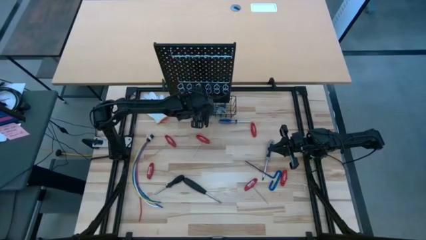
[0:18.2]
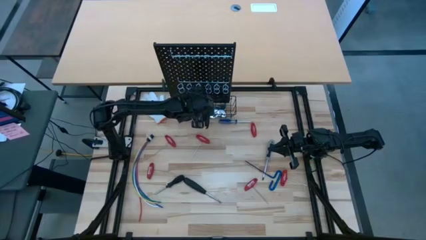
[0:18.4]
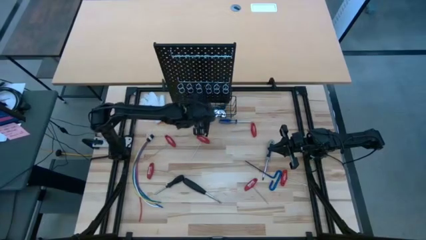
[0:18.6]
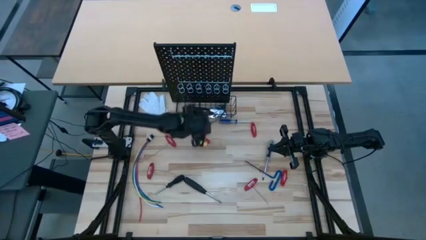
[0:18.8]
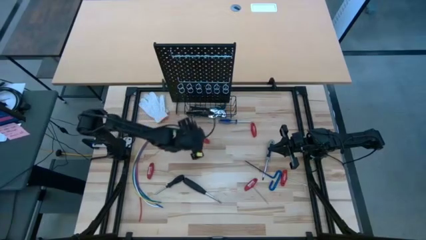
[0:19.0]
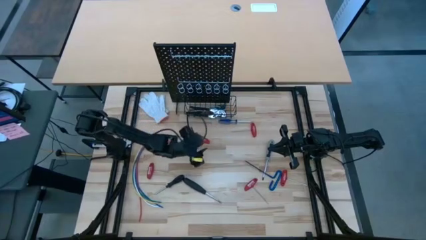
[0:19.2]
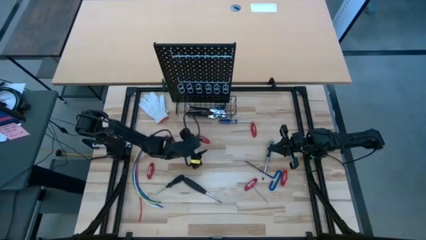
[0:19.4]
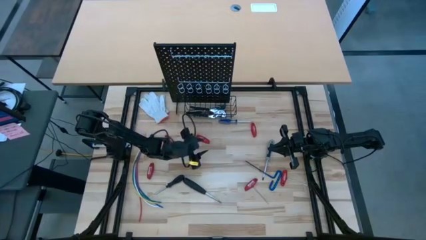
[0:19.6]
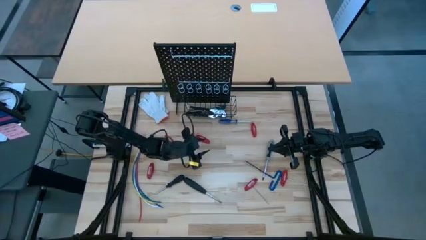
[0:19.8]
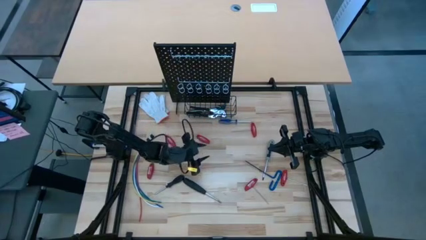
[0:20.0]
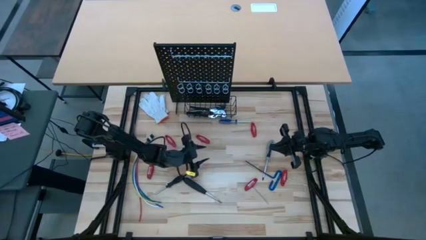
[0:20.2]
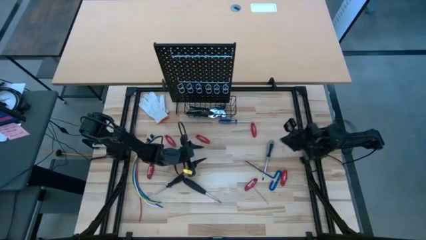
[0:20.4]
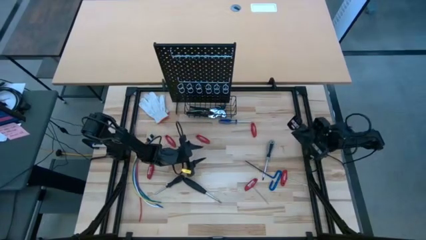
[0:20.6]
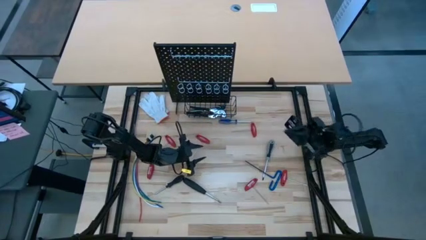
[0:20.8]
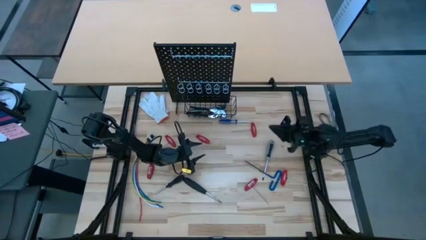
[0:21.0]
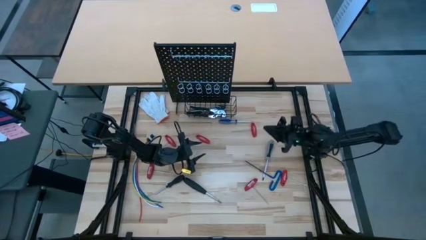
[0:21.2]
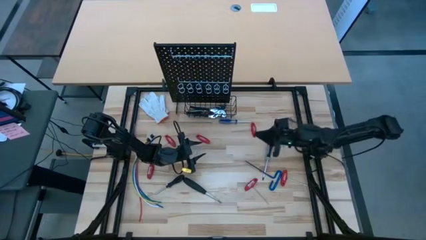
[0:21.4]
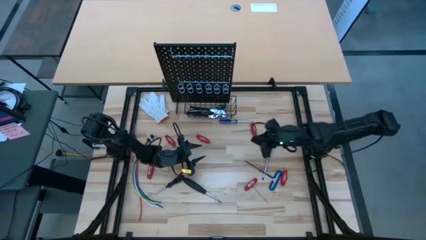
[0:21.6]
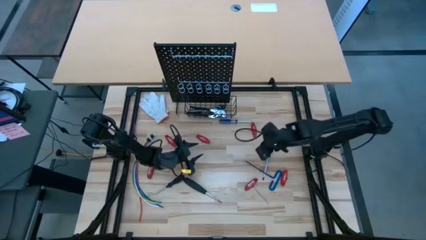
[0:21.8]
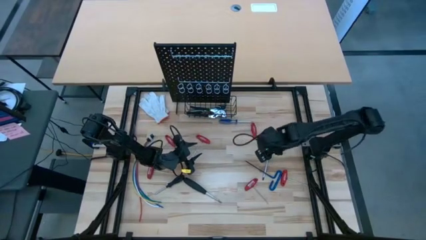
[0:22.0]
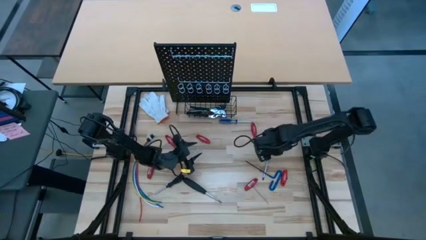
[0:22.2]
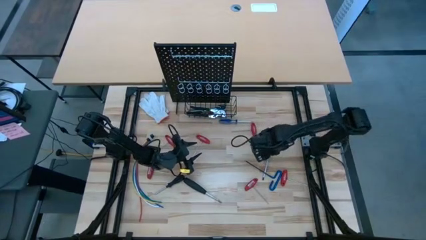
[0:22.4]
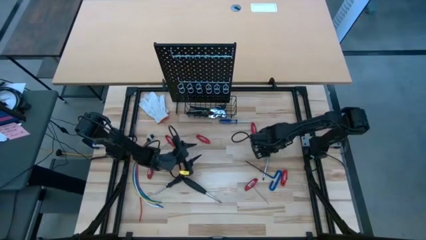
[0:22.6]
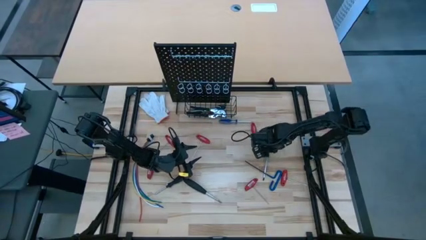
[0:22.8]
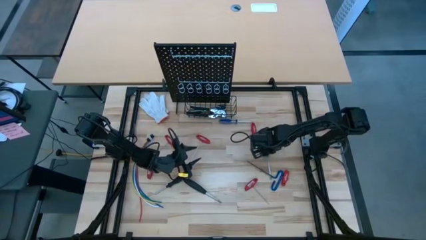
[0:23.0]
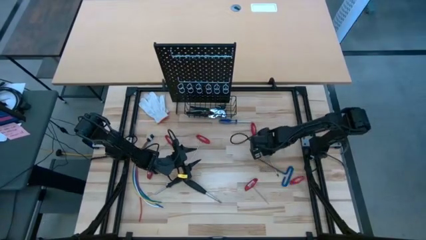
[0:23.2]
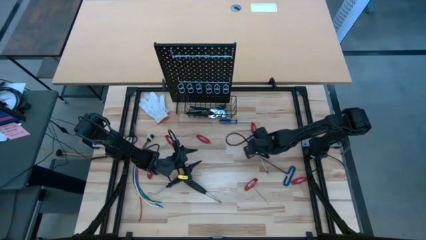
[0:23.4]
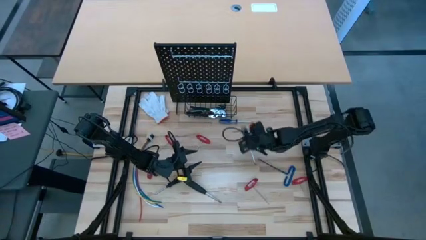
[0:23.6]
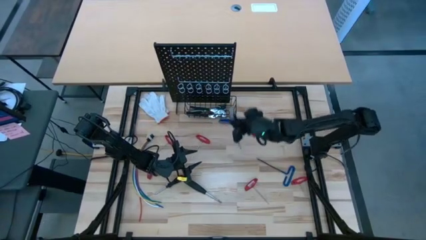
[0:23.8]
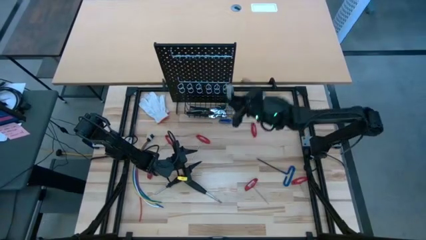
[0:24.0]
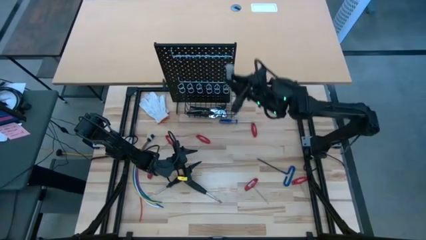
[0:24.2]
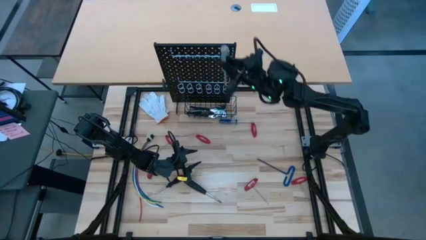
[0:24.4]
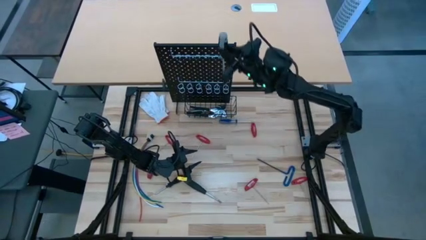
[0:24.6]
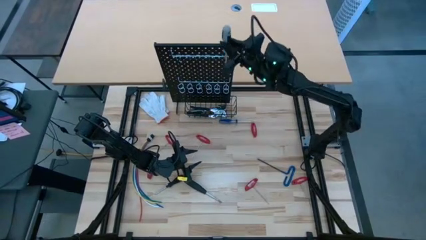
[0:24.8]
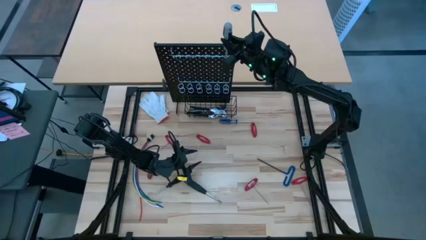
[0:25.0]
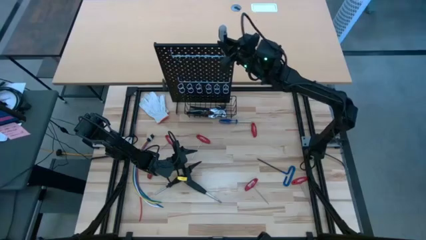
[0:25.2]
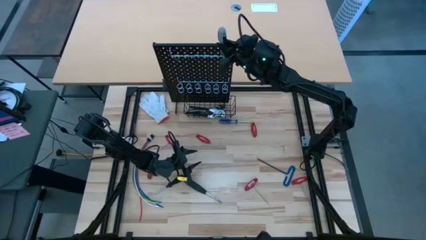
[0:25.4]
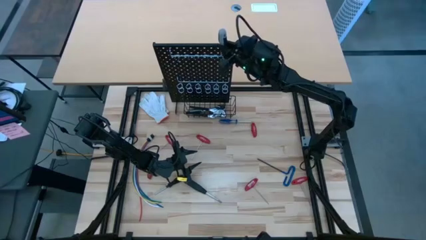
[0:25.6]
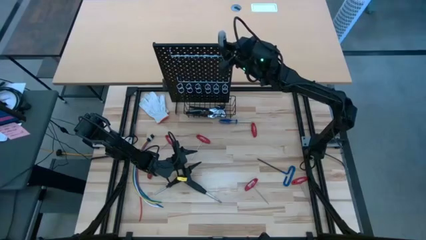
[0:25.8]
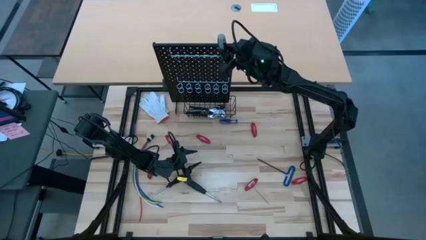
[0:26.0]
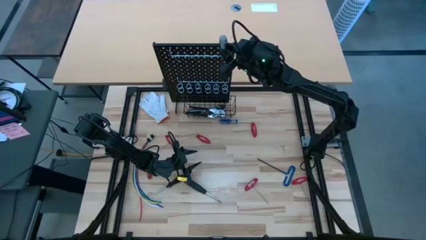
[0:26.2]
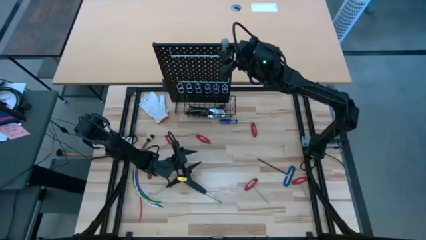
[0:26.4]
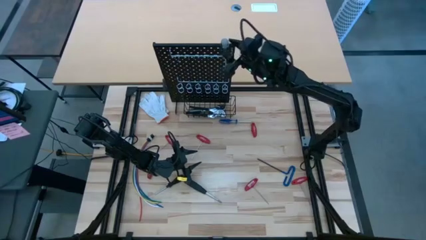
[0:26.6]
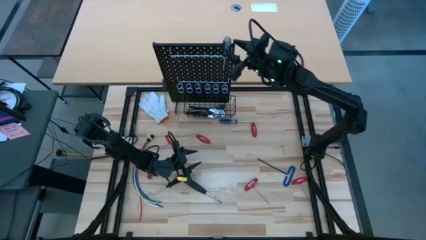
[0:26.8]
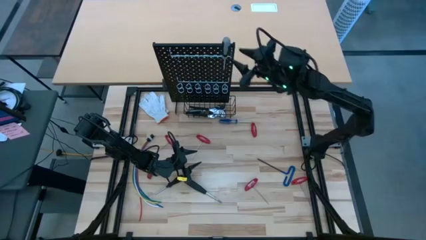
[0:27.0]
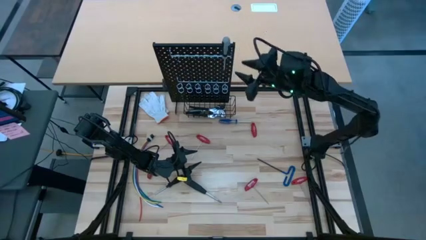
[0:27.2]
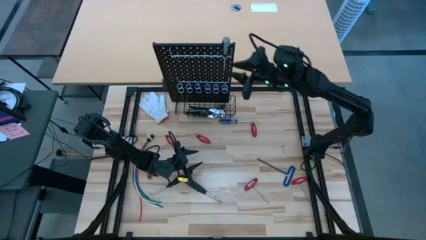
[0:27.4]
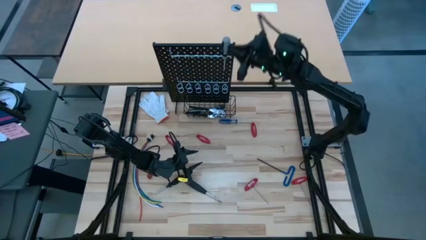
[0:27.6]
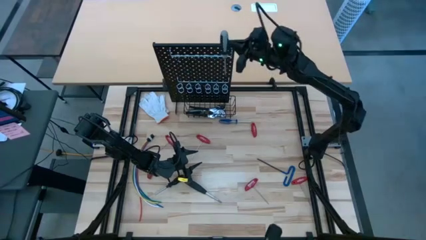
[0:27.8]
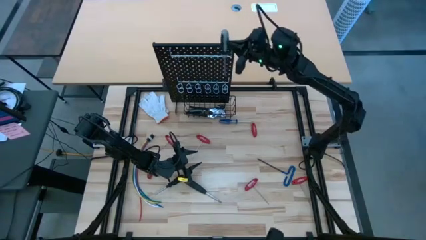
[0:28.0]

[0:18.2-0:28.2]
Task: Hang tools onto peg board
Hang the gray screwdriver on the black pegboard

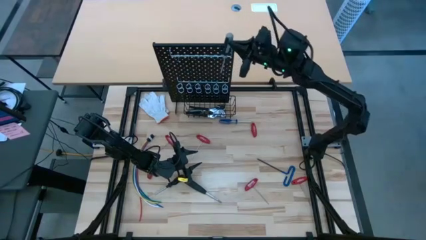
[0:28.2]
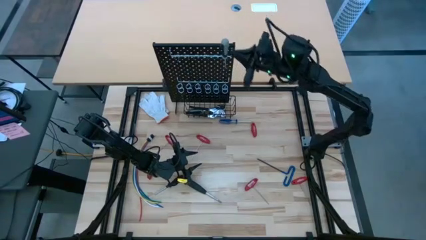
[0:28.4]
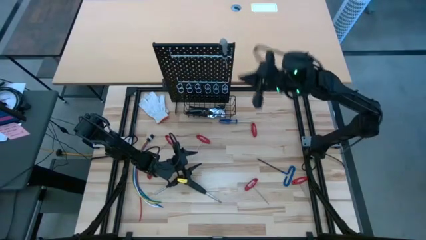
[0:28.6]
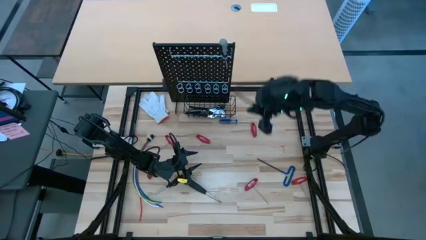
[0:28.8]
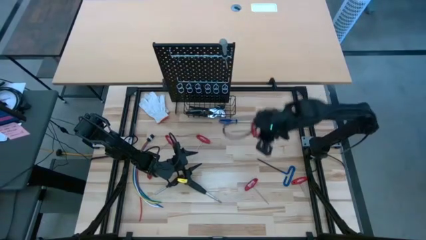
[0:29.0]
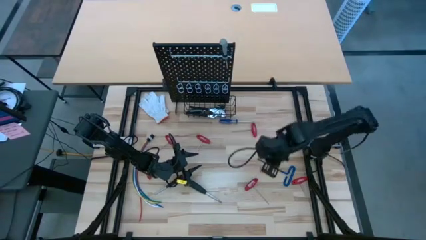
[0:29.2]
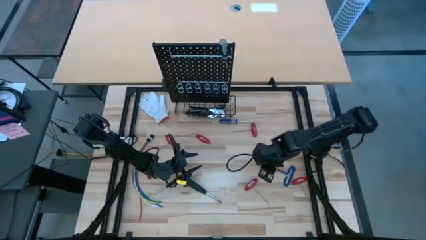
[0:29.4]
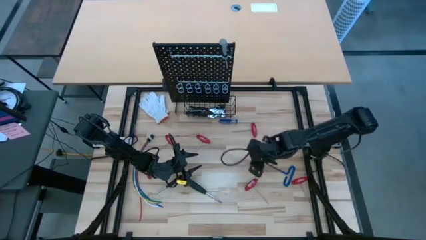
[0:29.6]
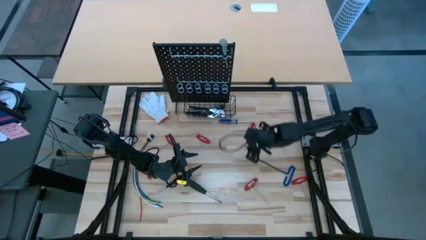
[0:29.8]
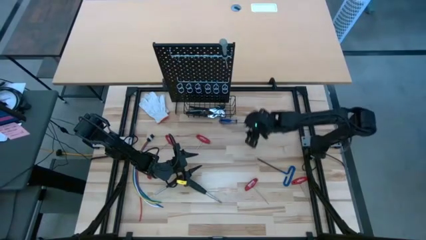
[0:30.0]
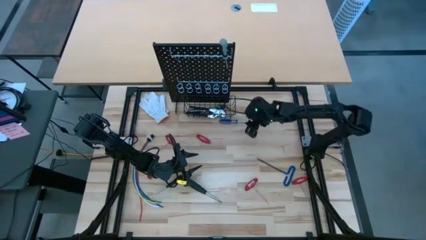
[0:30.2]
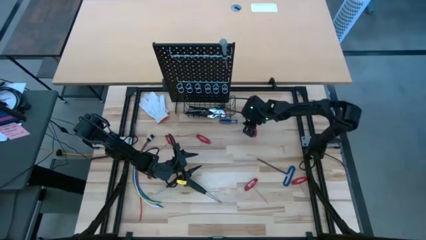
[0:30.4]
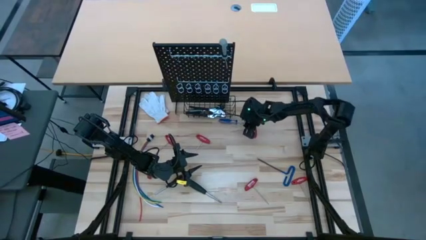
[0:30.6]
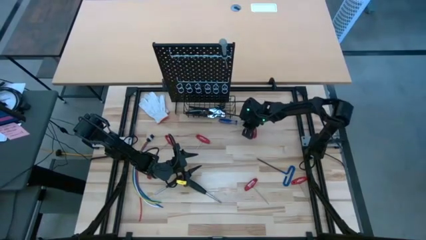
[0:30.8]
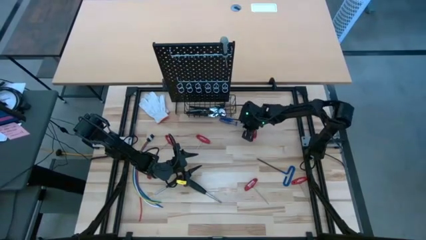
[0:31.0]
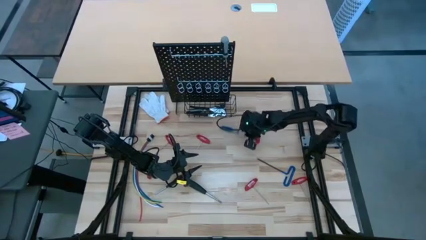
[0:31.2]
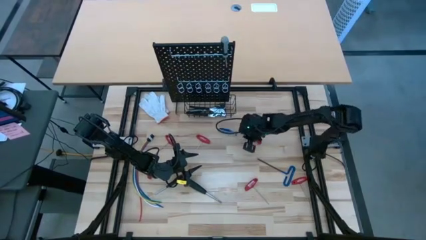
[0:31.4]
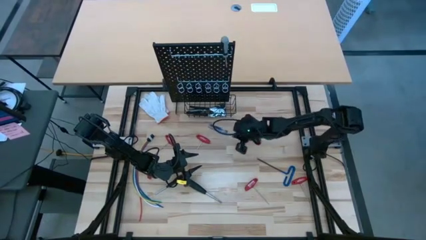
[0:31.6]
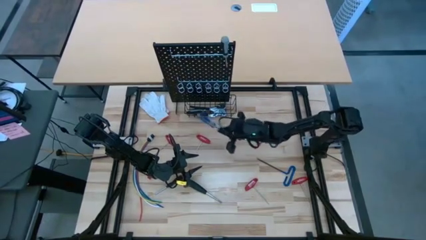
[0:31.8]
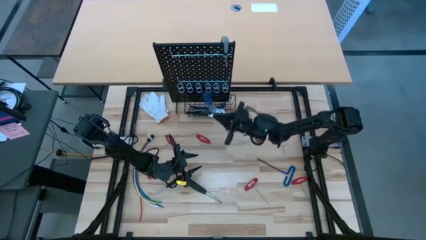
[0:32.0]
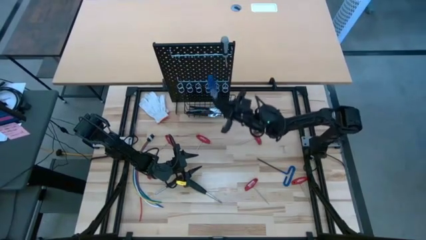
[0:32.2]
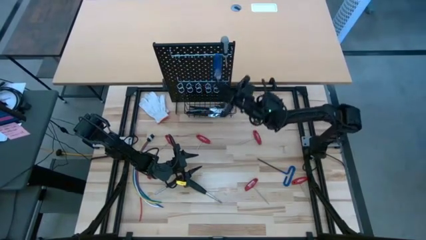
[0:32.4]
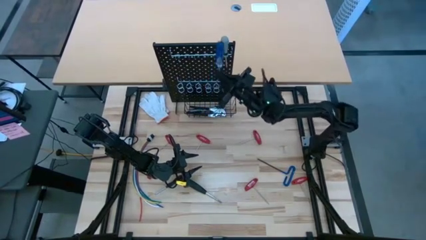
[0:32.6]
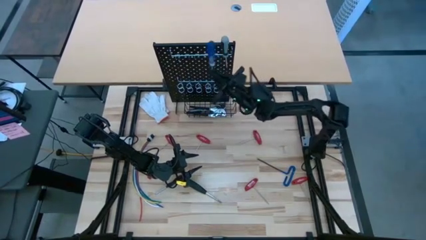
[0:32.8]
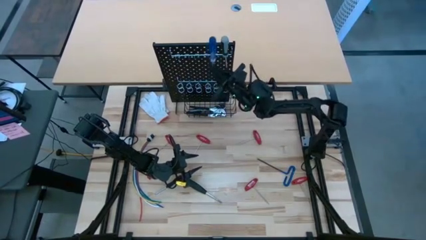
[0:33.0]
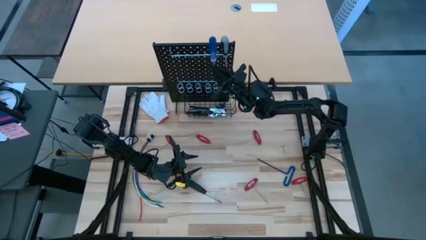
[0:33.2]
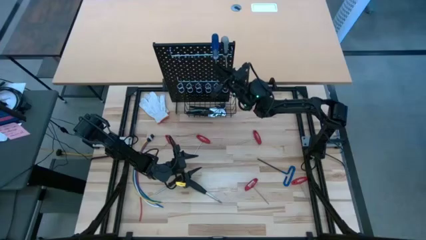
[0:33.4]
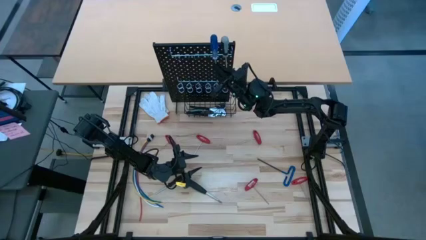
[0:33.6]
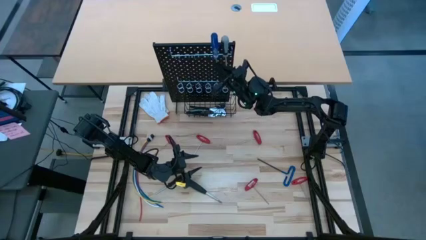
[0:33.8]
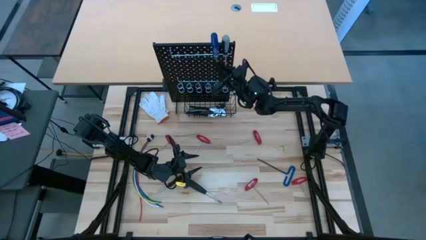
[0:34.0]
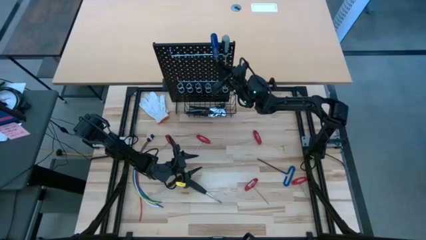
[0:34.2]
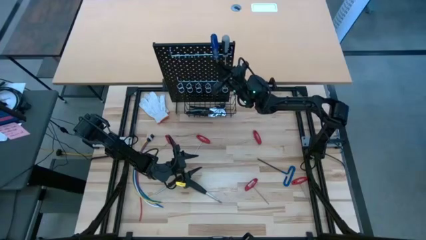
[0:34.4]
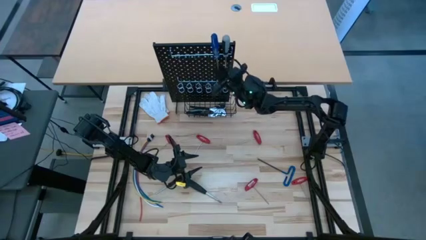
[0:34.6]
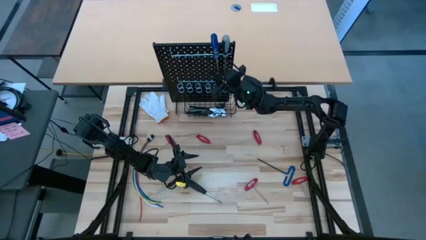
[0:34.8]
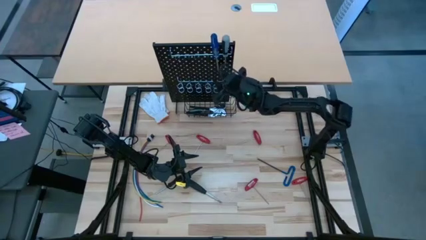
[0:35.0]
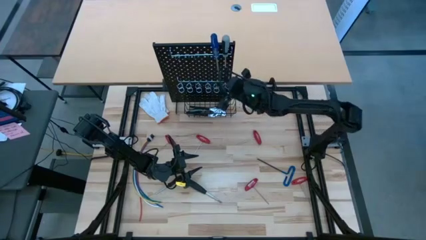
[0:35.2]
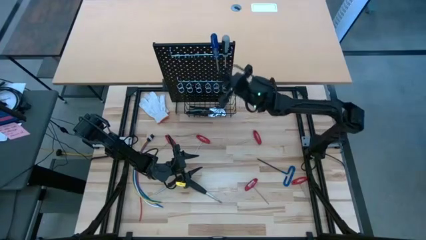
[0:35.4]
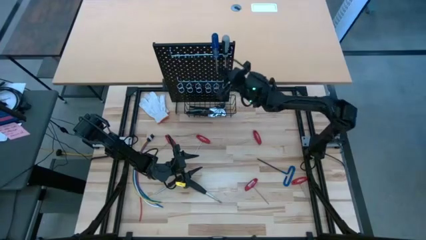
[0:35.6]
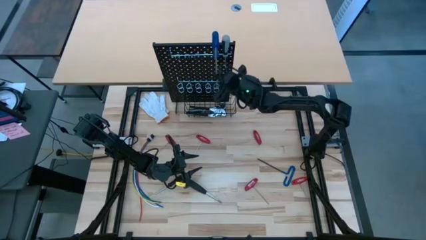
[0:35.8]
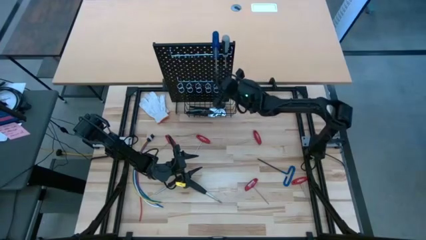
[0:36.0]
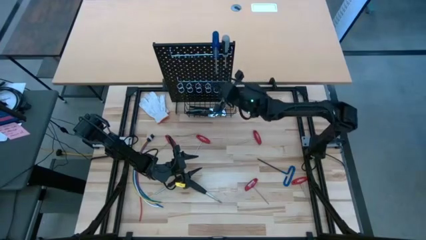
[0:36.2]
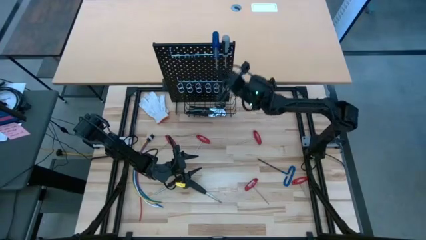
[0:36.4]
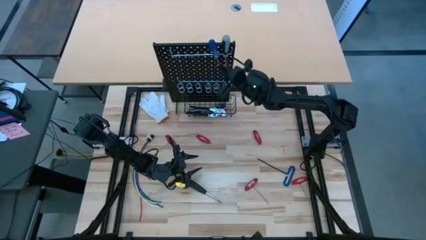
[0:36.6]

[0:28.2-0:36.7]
Hang the blue screwdriver on the black pegboard
